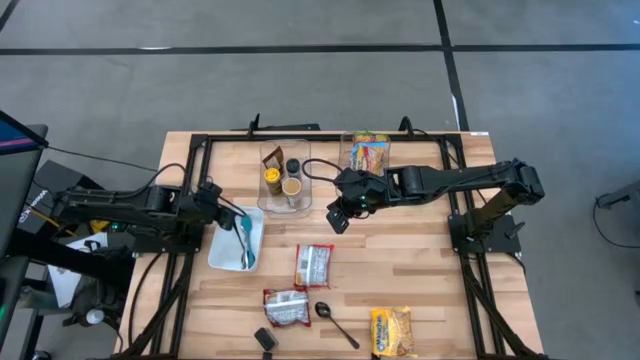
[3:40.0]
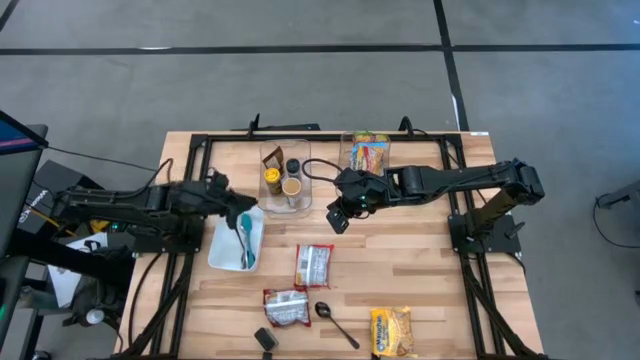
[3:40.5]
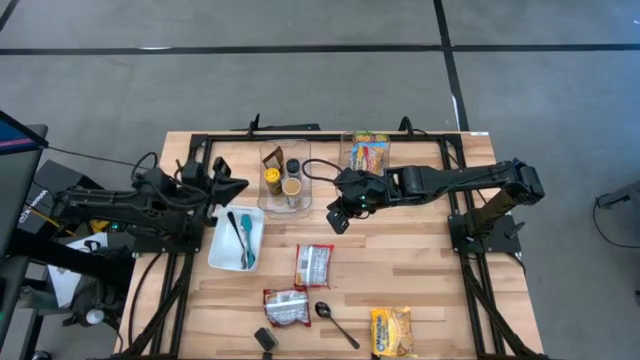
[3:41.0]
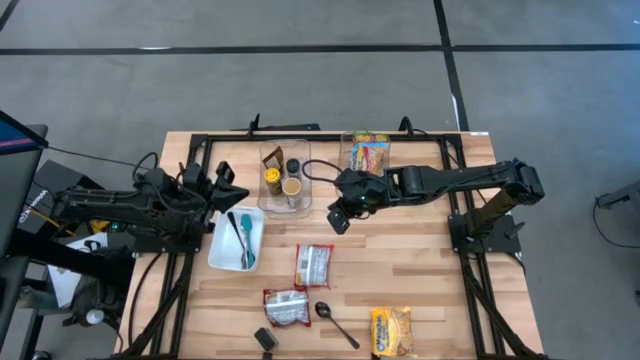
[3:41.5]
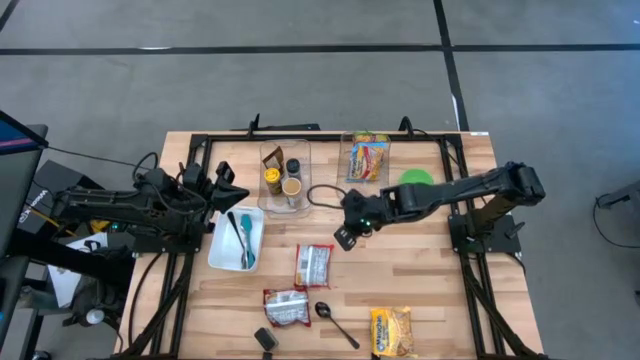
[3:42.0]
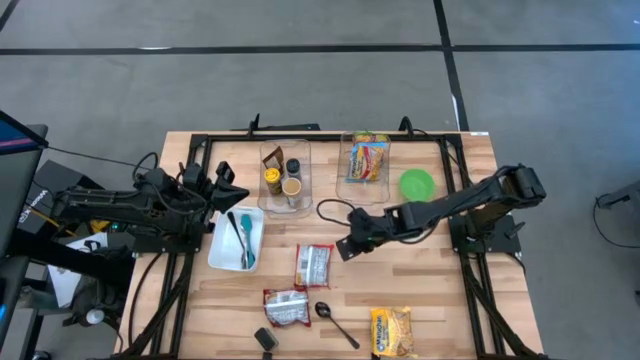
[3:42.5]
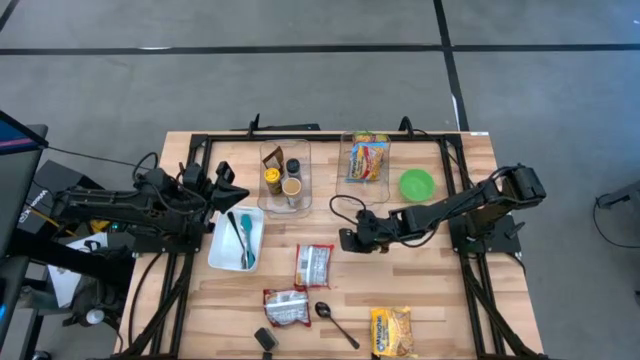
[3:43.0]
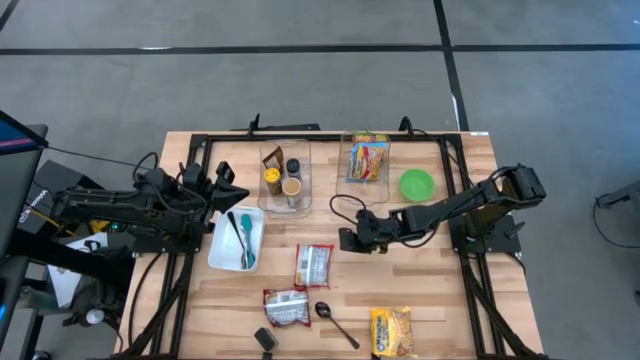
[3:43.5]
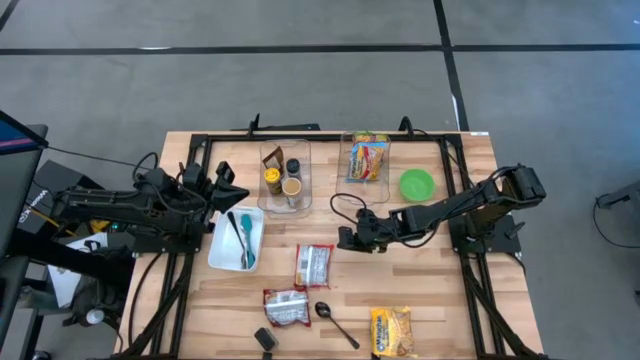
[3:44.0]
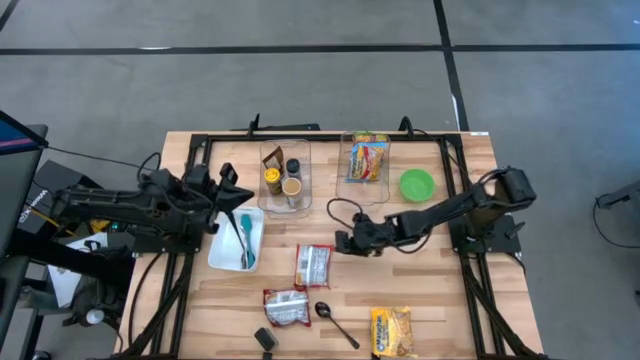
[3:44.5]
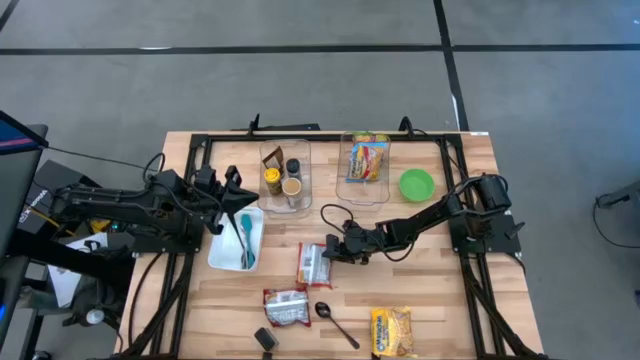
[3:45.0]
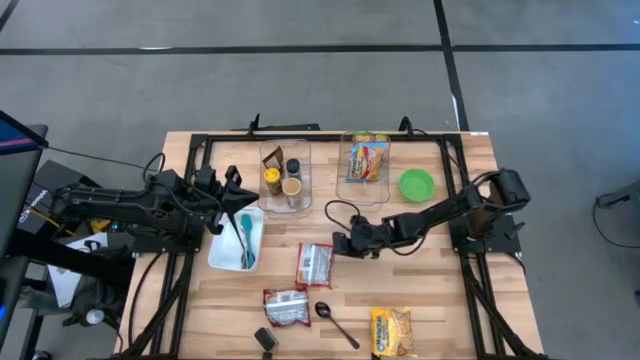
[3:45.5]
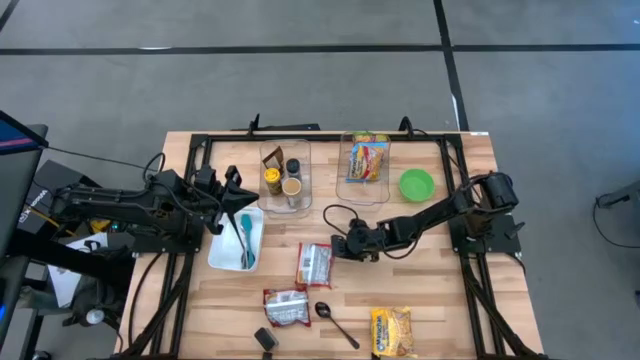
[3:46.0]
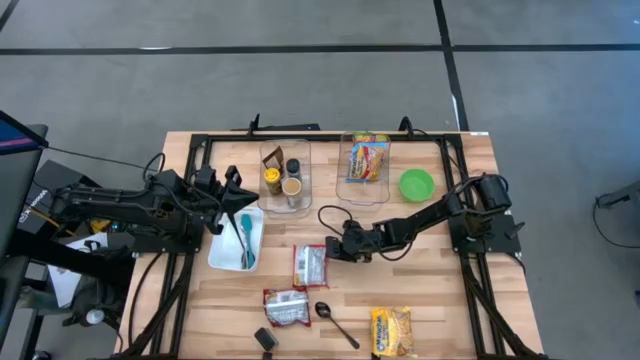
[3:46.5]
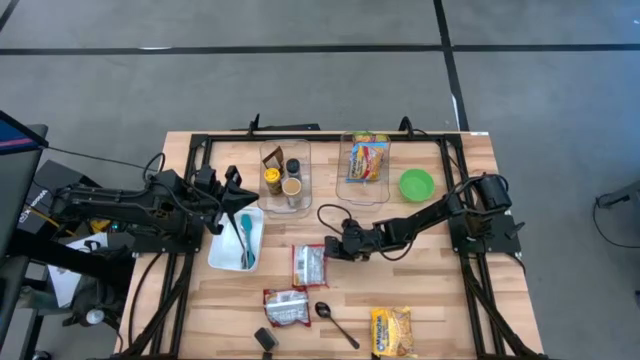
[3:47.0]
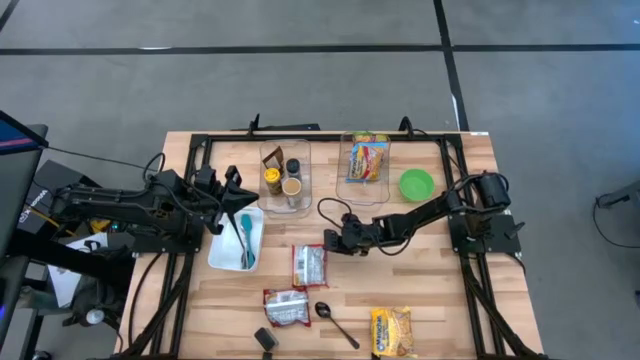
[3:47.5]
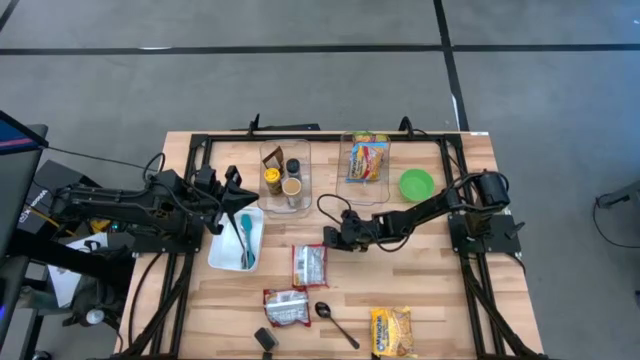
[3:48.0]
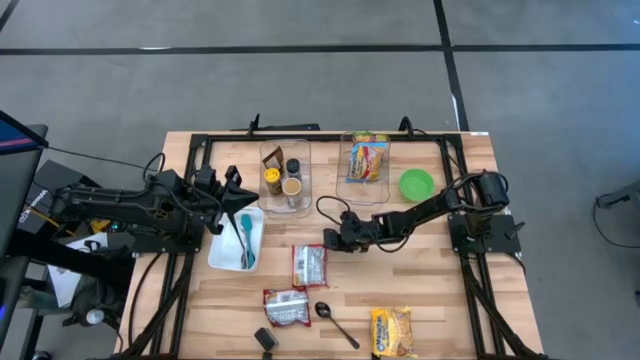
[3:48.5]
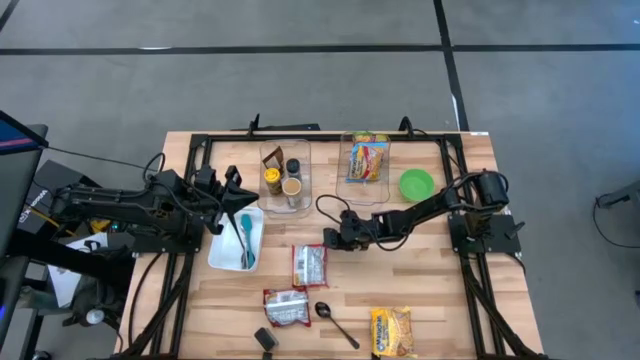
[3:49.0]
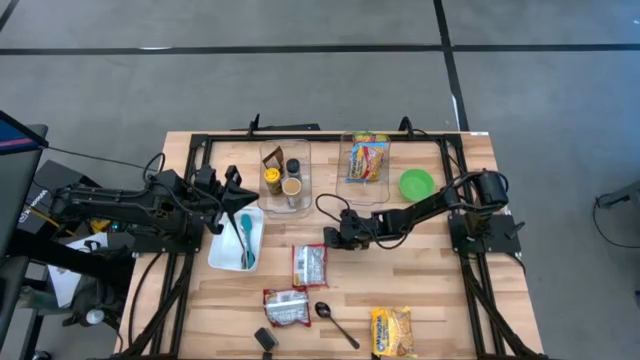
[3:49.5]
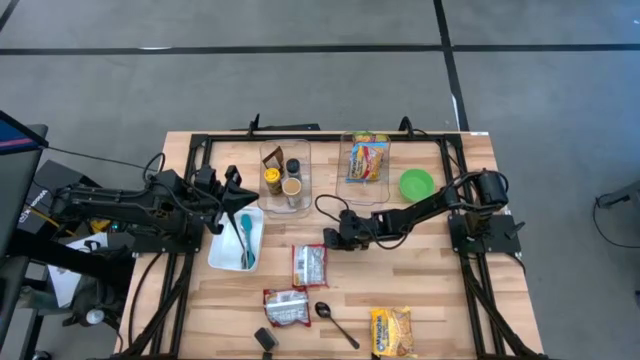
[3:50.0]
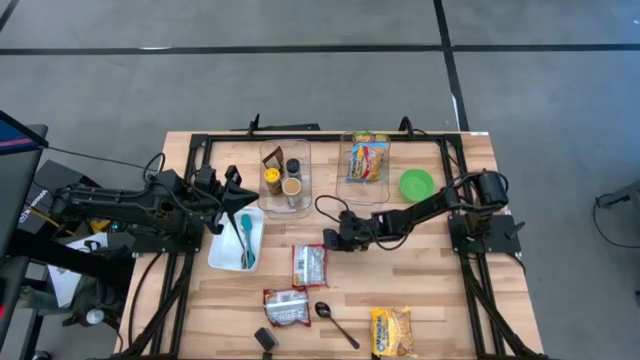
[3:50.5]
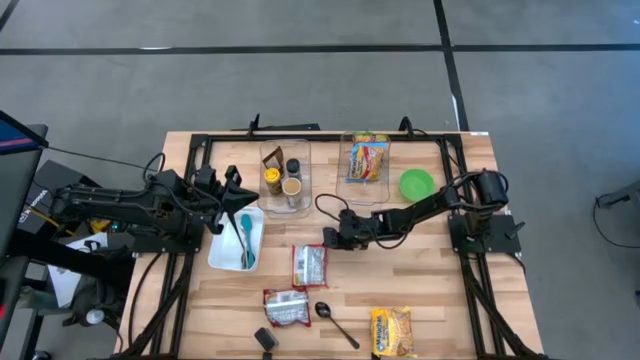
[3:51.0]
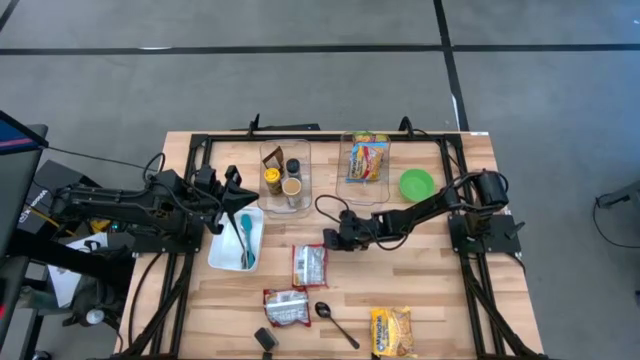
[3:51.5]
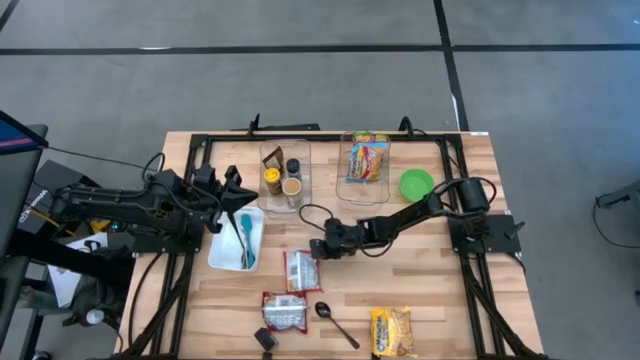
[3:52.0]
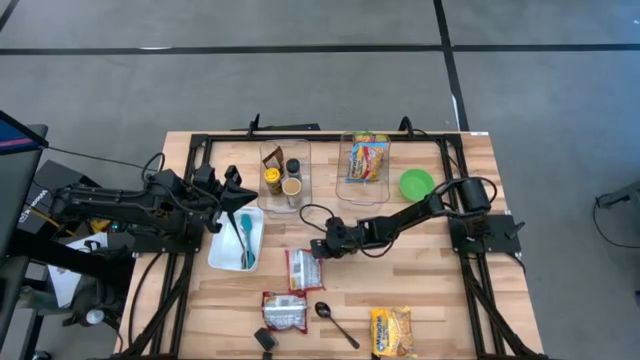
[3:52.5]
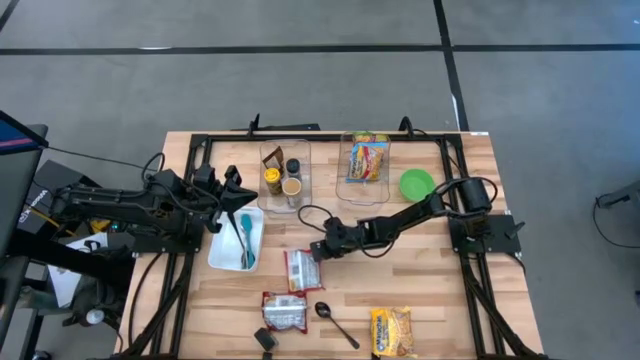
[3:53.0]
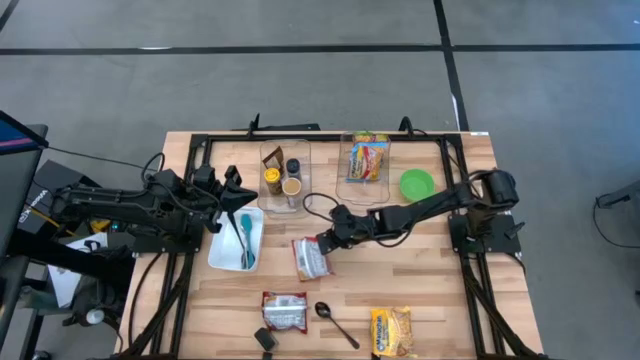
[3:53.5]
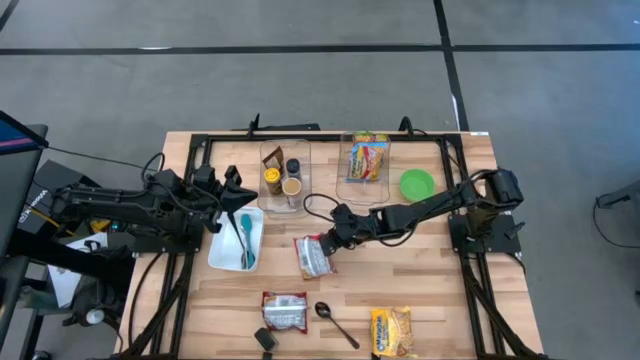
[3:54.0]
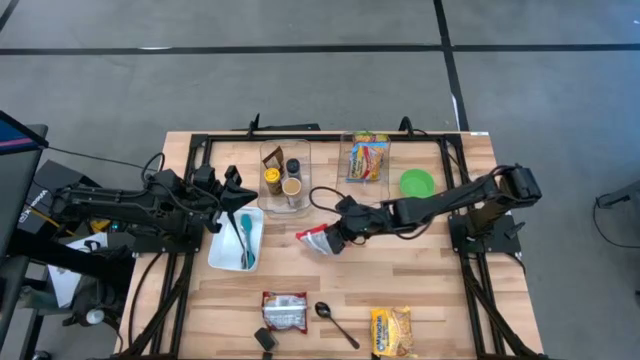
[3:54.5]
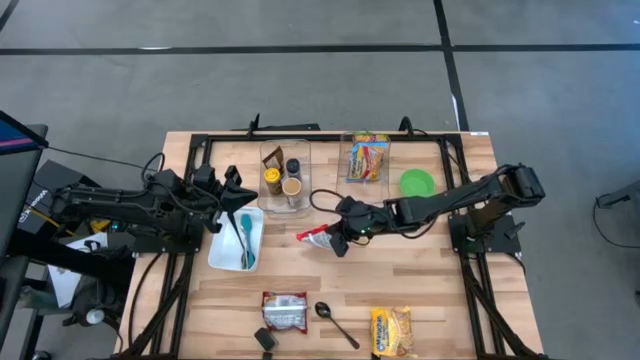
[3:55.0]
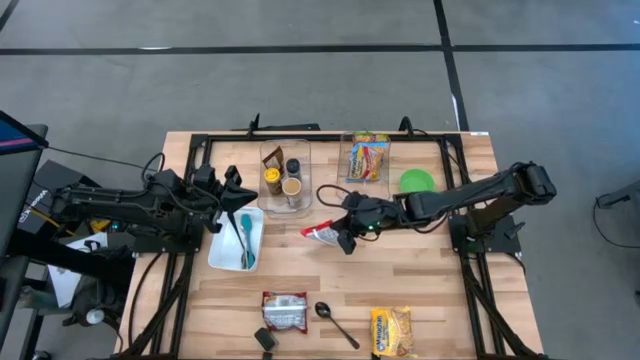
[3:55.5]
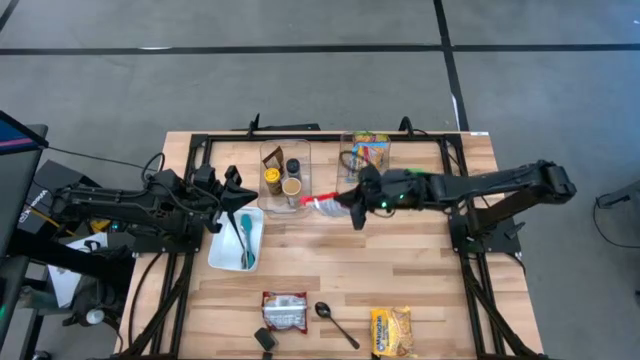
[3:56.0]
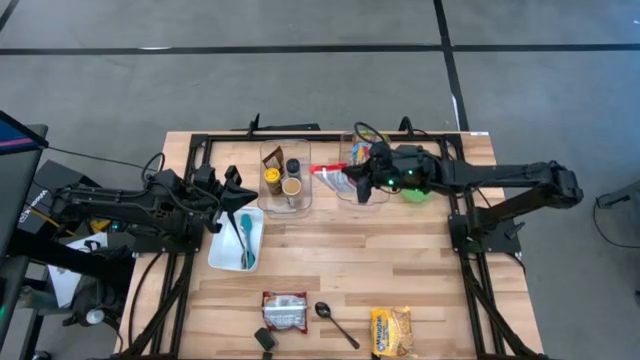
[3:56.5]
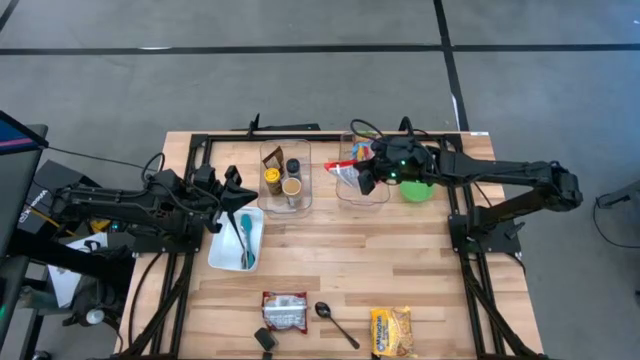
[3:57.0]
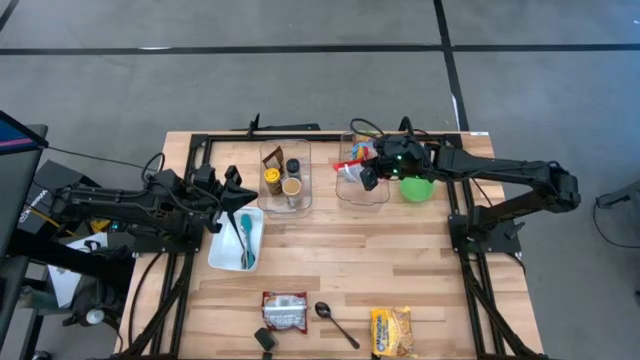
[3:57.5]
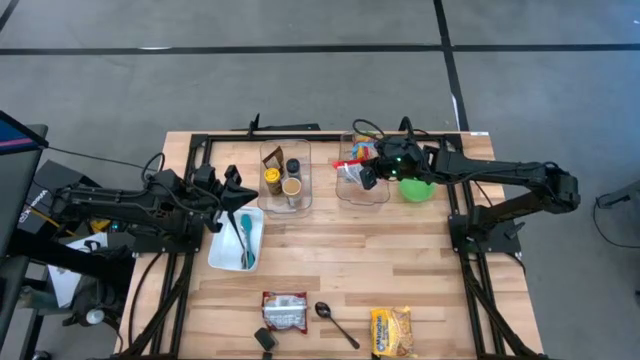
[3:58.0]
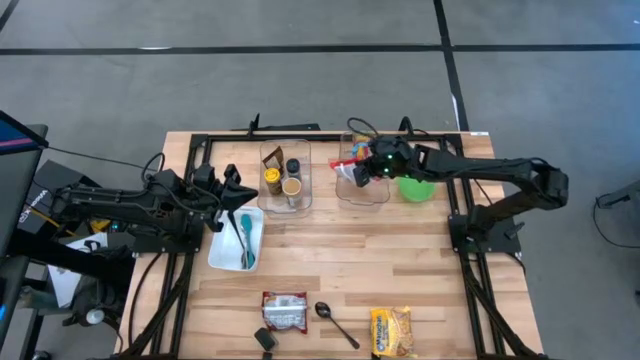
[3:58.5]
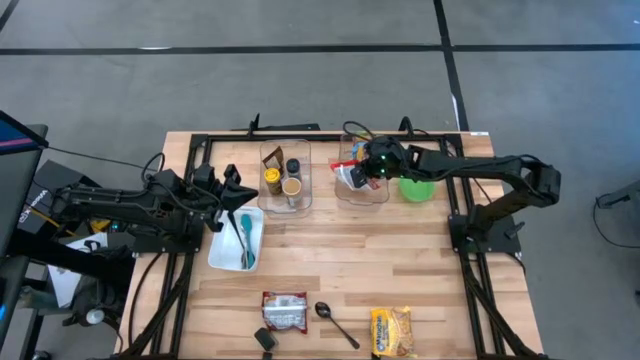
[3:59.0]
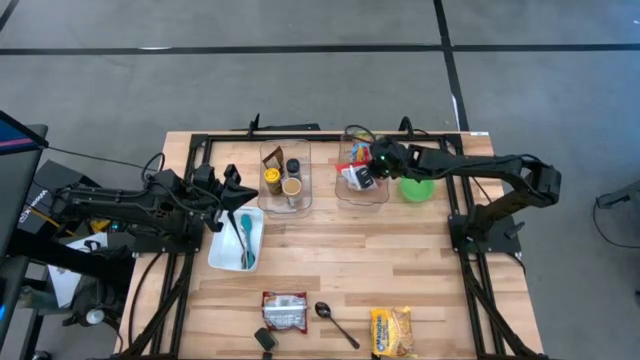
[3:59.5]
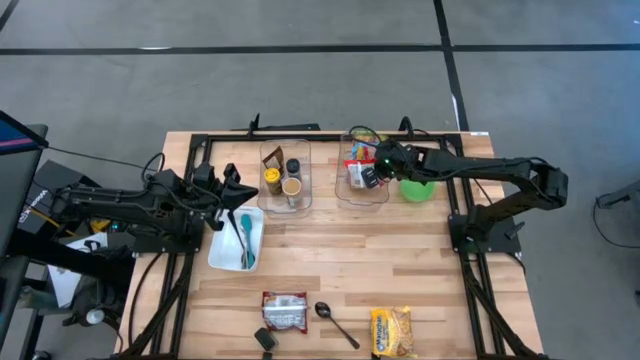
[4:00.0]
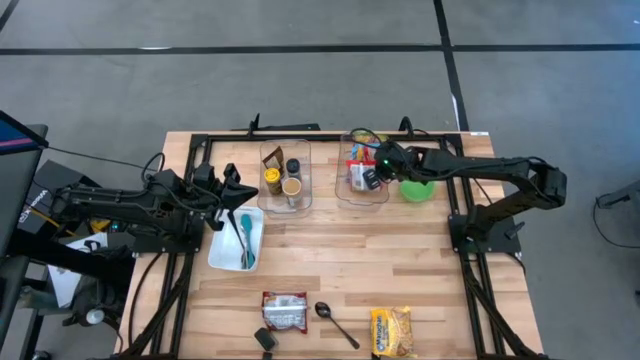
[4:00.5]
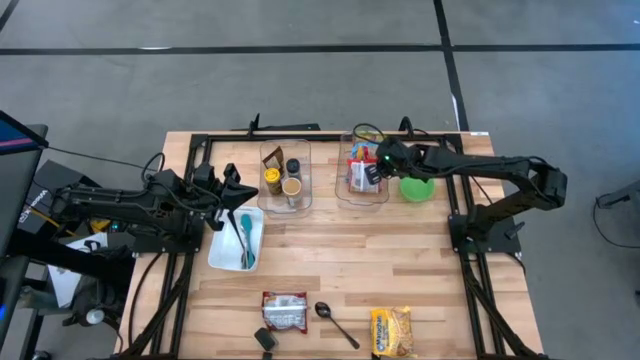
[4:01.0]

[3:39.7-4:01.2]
Task: Pick & Place Food Item
Put the red noodle pack into the right transparent bin
